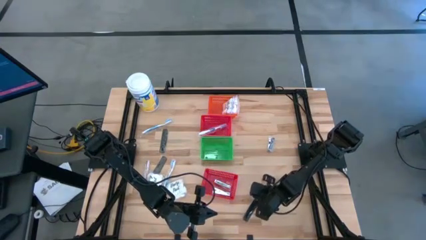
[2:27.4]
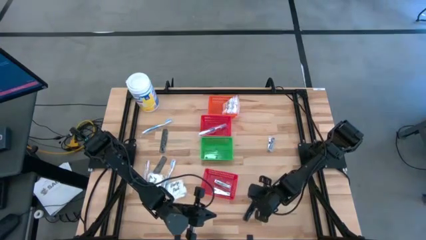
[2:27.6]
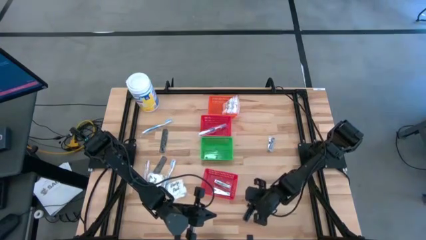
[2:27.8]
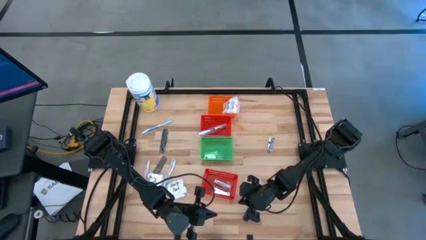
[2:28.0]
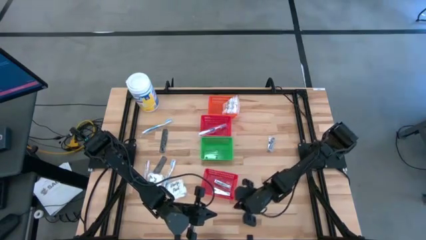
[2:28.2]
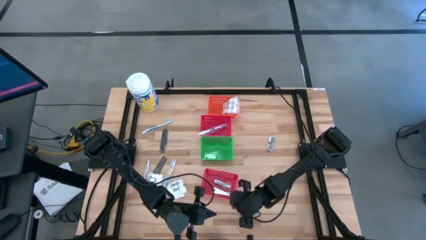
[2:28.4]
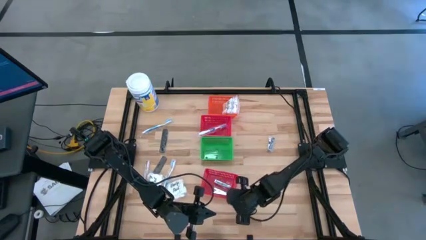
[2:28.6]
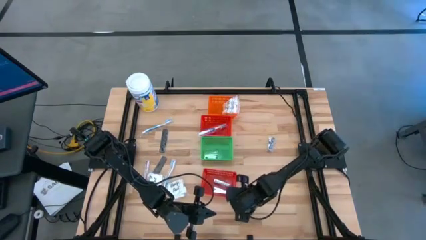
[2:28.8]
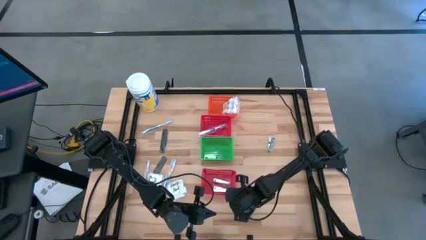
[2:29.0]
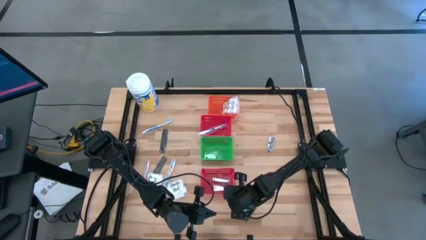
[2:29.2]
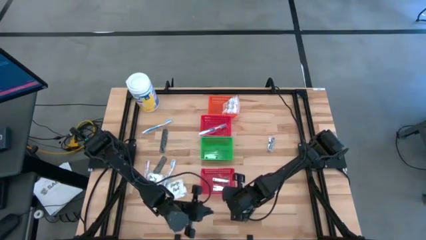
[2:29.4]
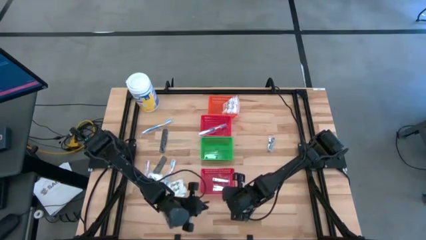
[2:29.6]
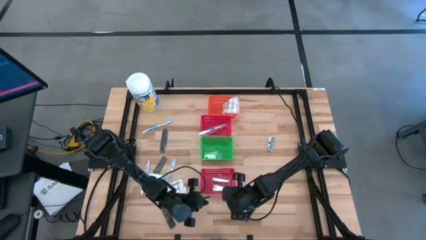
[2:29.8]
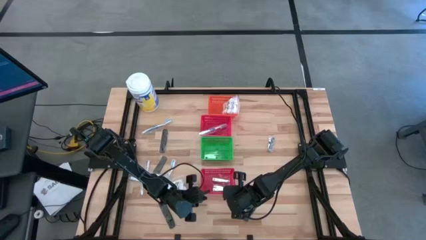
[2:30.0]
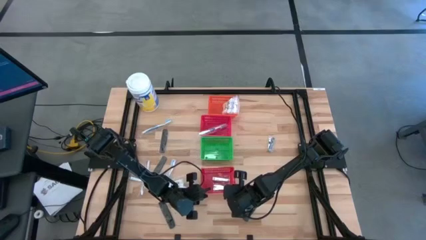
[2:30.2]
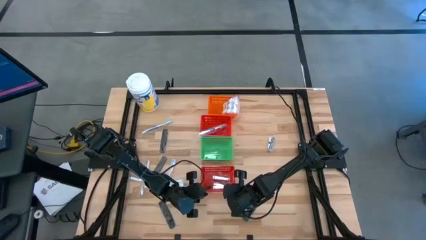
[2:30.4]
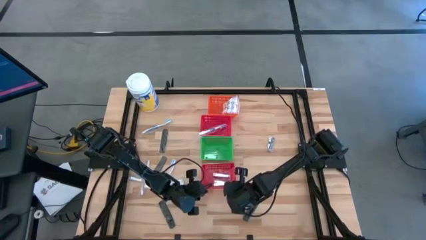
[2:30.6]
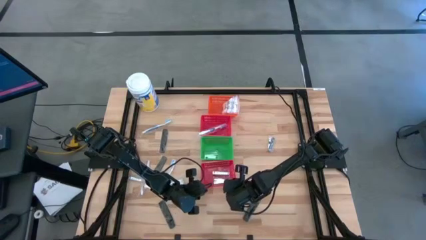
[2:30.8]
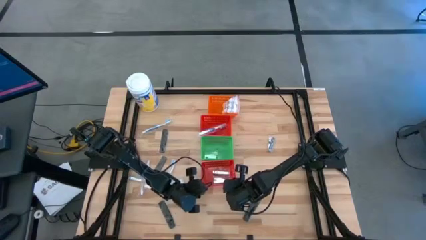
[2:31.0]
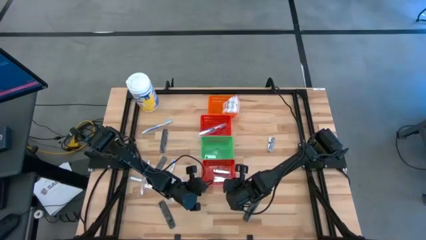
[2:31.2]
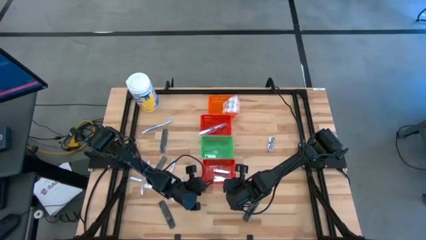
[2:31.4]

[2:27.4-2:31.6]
Task: Pick & Place Travel size toiletries
Adjust the bottom red basket

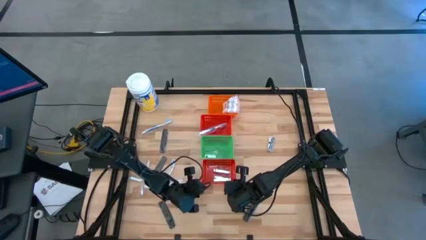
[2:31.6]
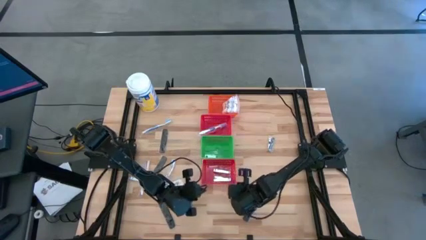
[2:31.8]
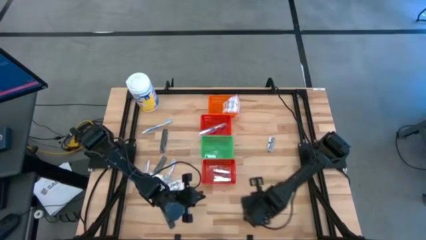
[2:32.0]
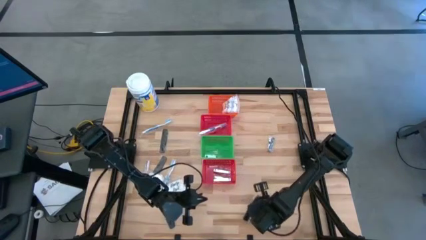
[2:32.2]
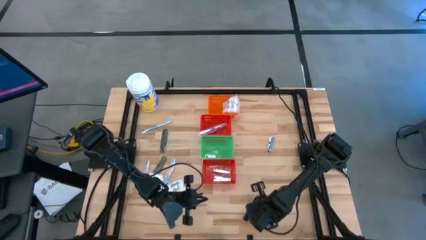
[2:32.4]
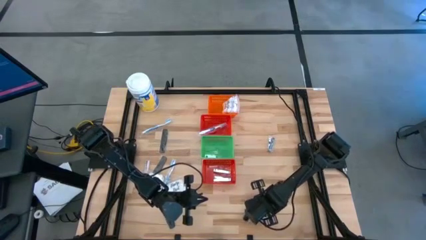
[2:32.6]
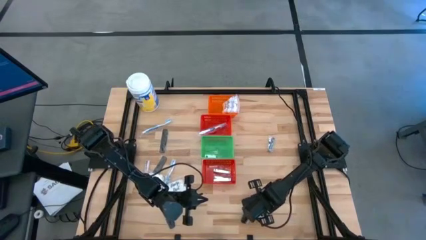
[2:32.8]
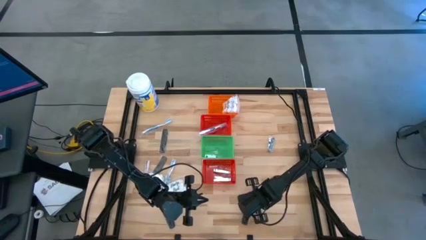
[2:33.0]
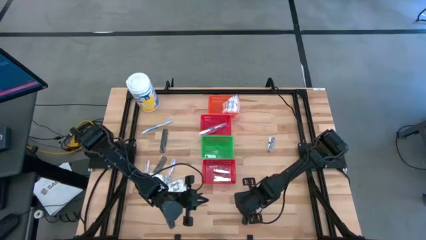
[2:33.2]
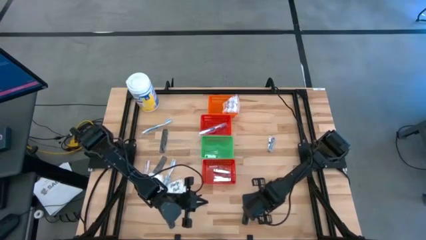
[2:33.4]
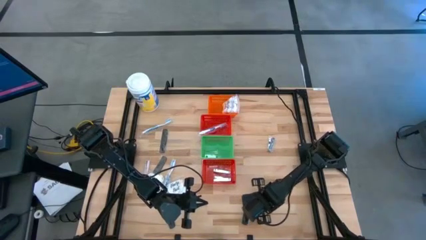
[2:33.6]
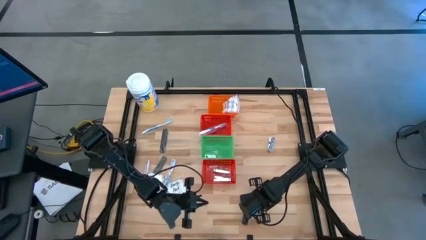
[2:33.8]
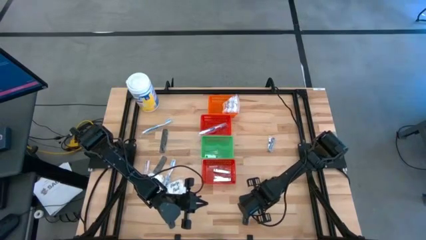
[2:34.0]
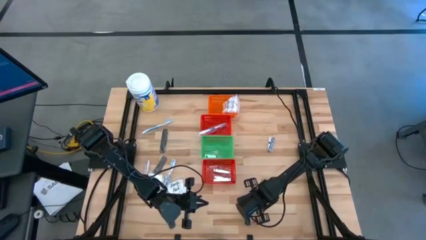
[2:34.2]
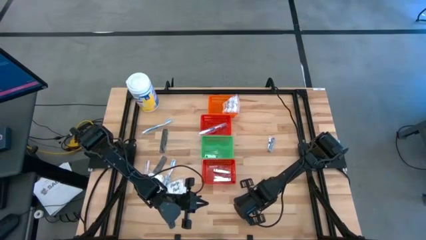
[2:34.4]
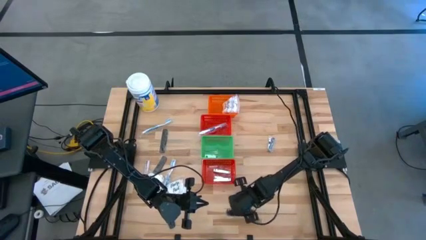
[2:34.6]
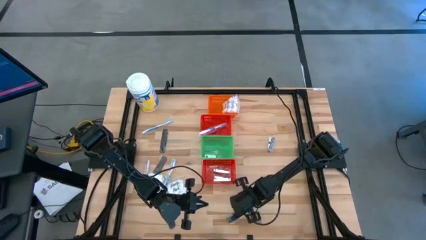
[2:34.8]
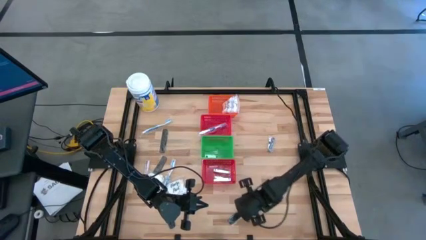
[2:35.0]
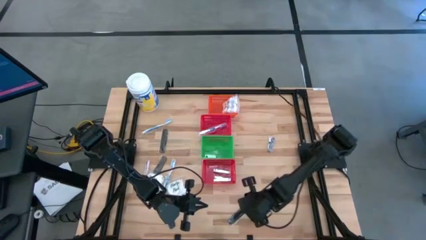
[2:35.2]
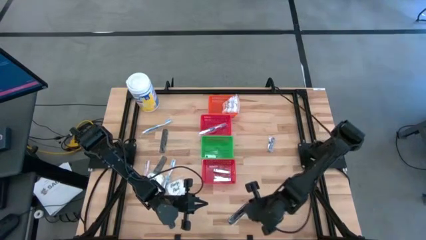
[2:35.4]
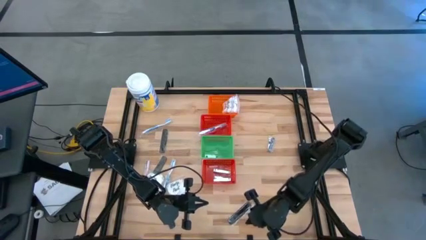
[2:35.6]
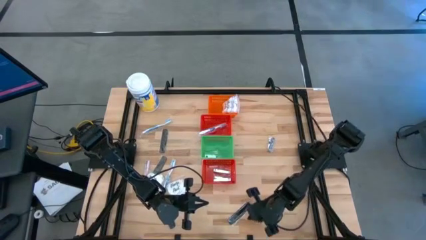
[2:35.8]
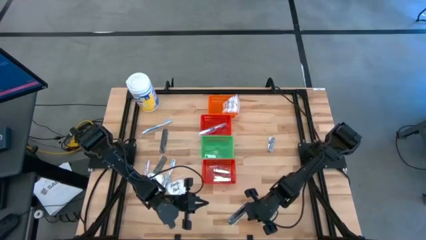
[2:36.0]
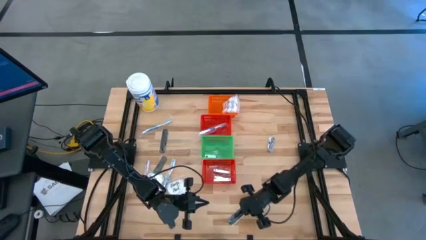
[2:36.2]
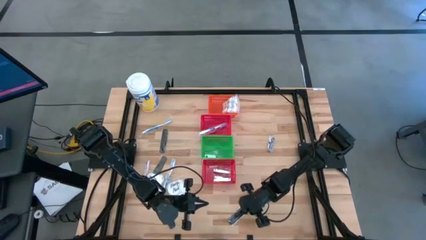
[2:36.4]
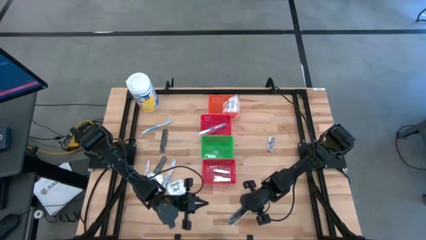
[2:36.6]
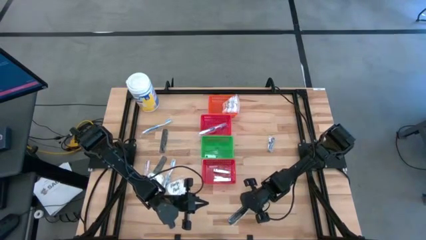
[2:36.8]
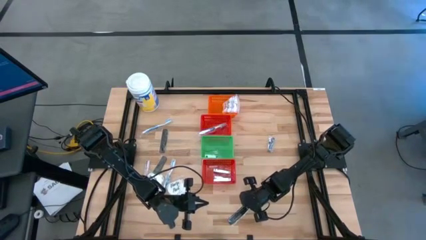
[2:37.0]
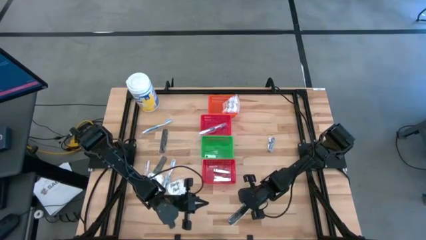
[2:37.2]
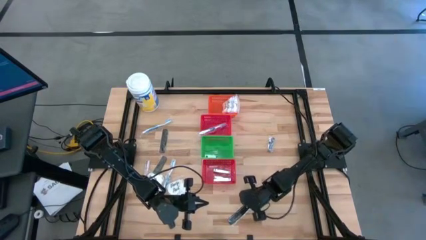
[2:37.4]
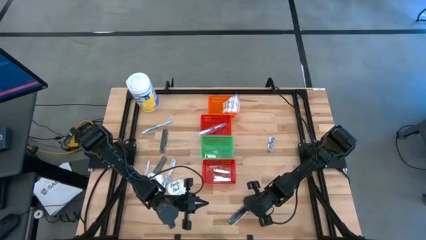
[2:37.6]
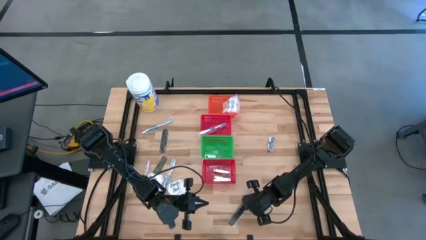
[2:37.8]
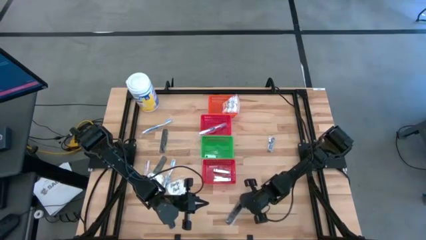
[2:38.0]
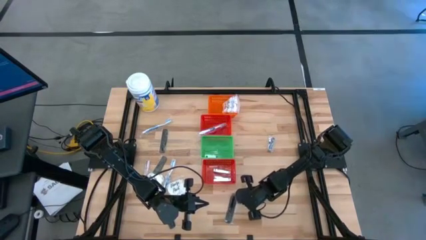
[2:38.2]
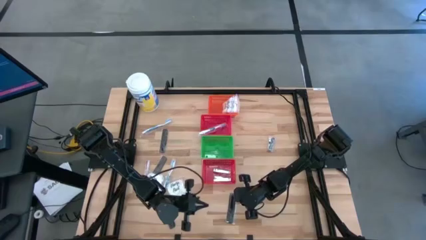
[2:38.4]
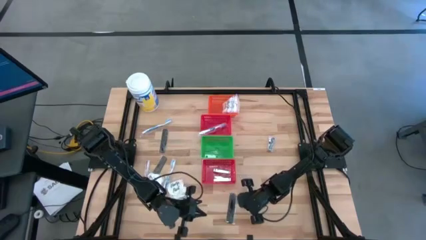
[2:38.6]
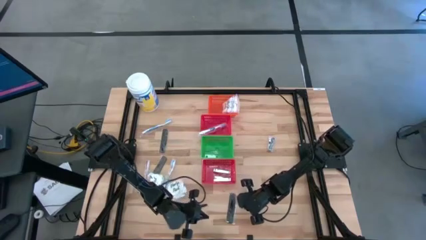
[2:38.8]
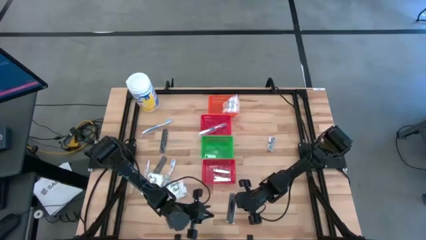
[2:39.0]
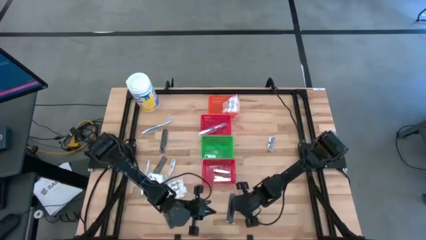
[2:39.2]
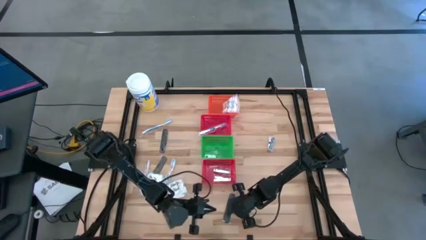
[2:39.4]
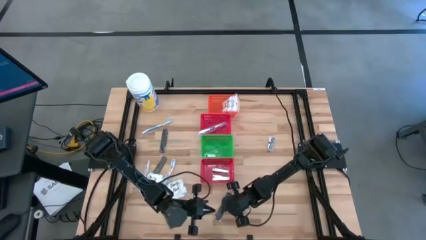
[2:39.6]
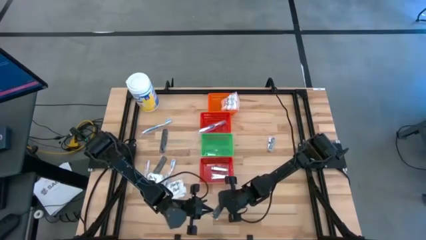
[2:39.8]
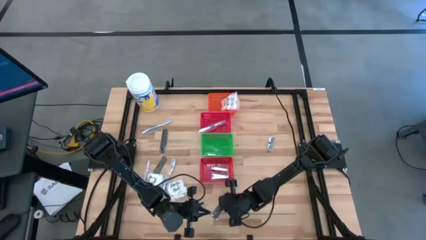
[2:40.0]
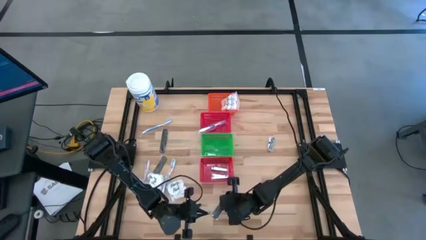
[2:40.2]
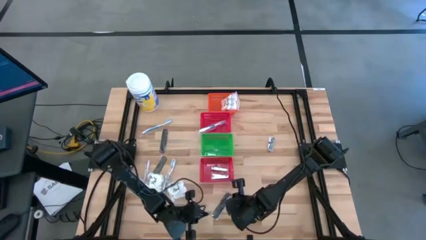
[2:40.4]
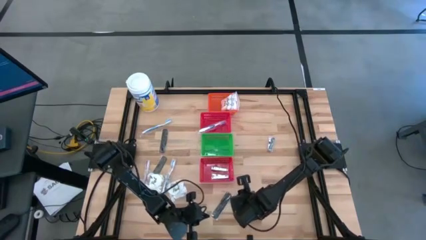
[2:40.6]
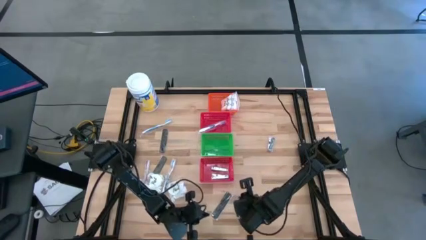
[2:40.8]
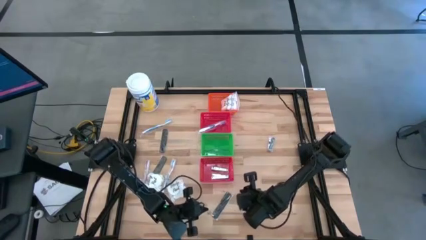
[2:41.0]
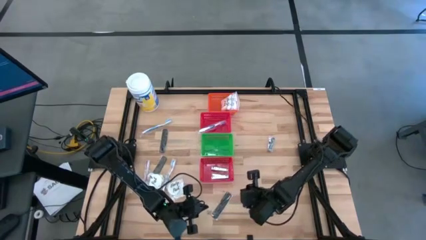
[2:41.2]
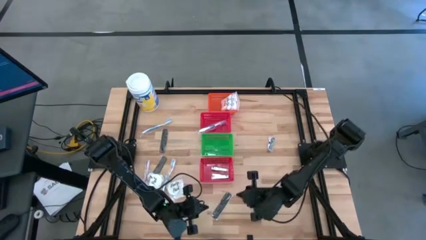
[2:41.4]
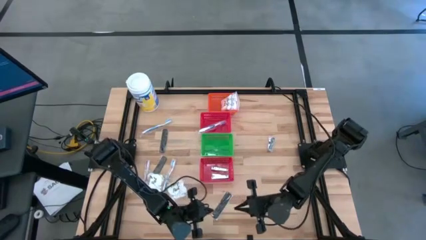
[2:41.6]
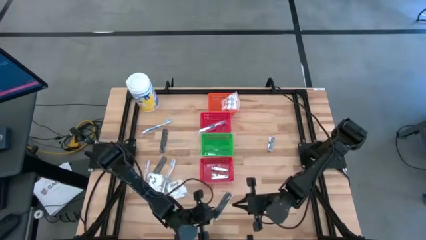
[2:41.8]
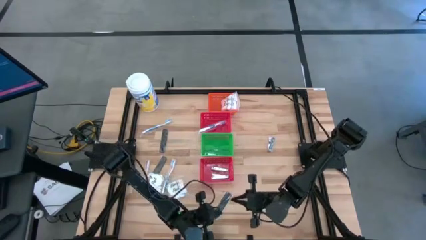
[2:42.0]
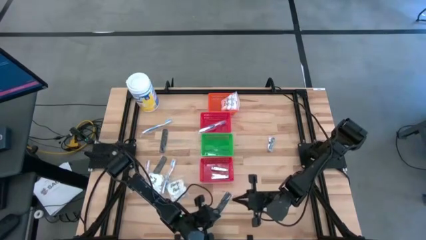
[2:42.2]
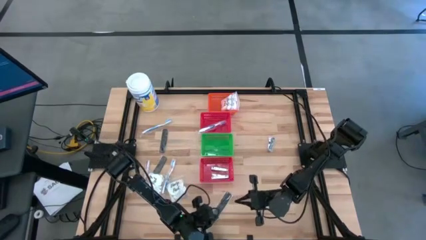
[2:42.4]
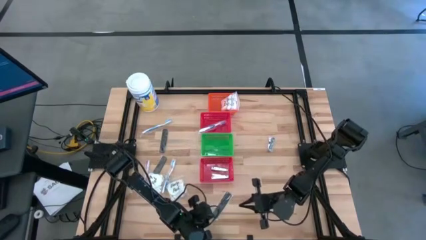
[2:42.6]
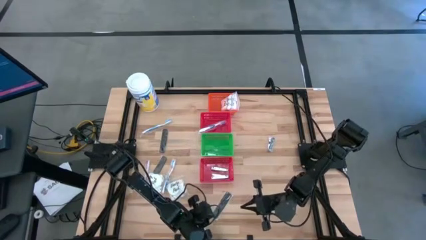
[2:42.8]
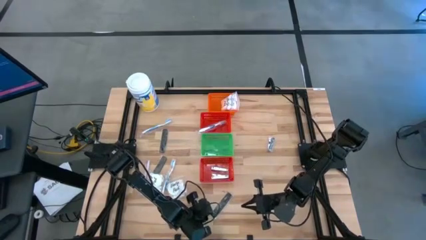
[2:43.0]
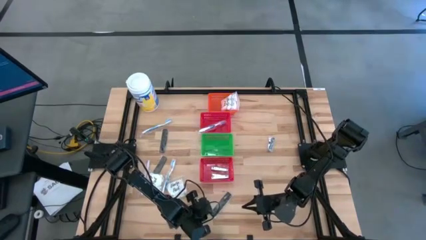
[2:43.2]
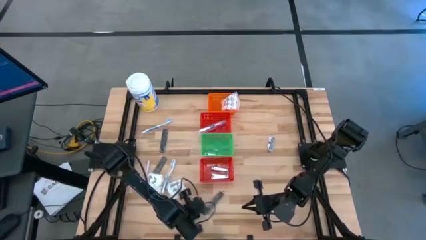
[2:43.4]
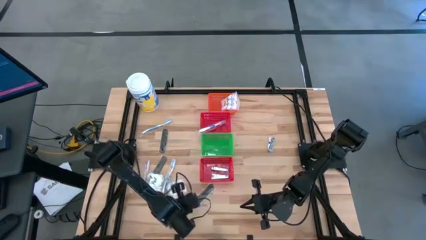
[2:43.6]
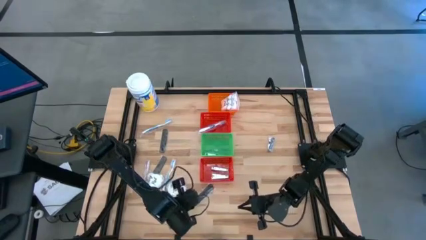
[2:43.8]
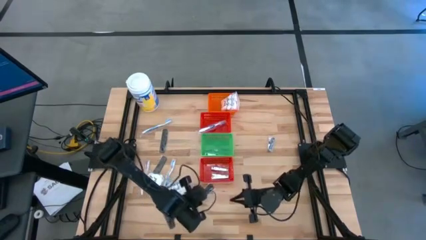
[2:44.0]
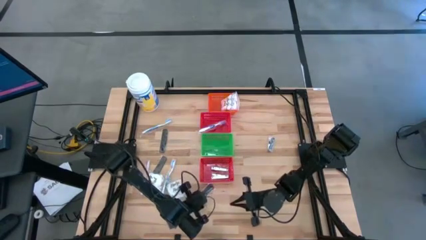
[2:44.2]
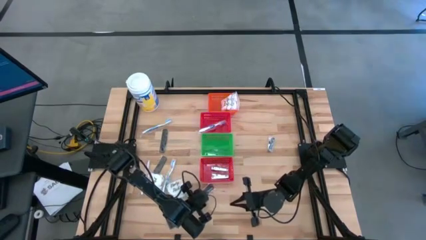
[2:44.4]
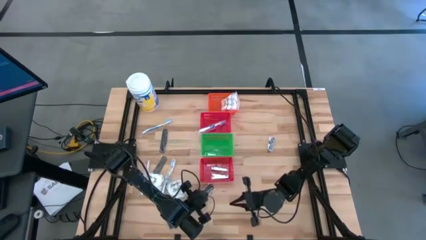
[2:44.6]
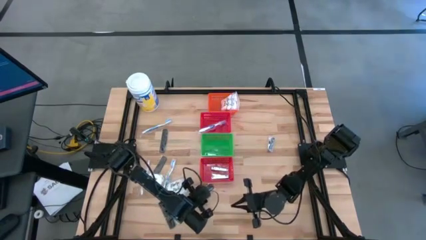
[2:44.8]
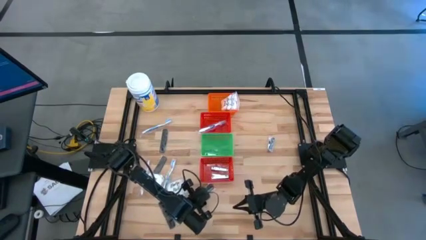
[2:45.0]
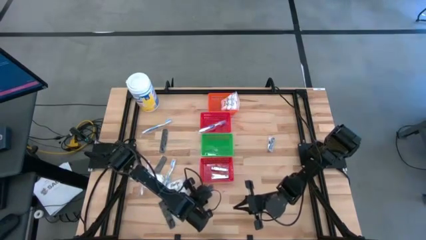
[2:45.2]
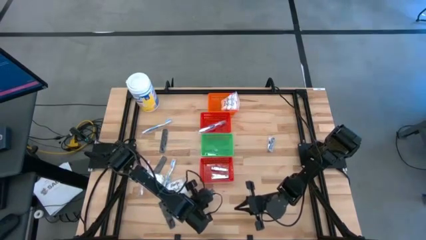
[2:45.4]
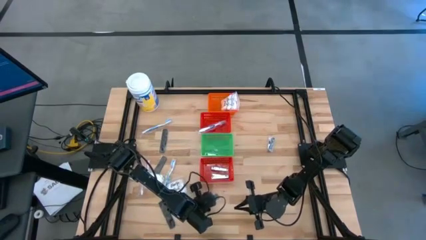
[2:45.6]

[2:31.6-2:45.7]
Put the black comb into the green basket
